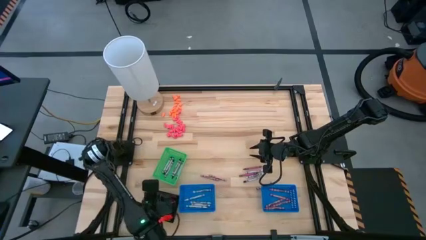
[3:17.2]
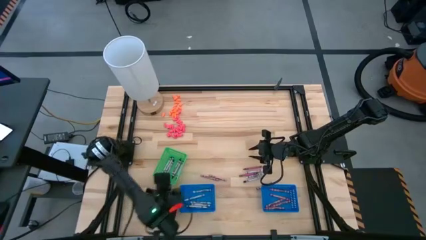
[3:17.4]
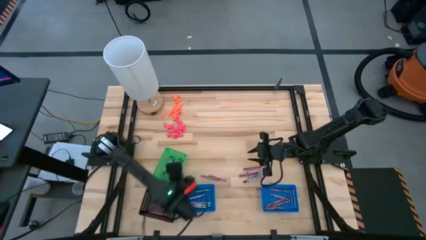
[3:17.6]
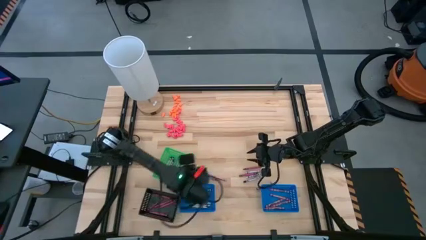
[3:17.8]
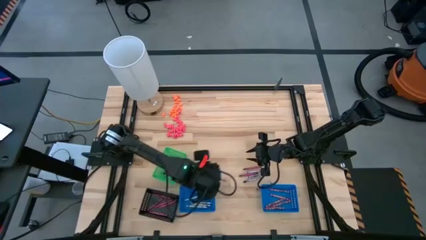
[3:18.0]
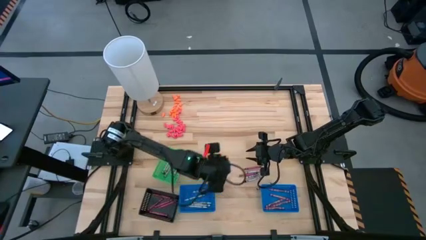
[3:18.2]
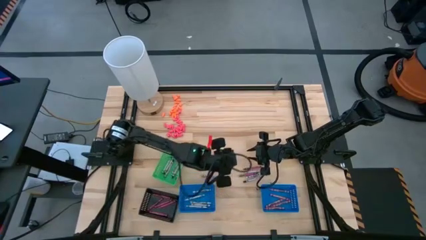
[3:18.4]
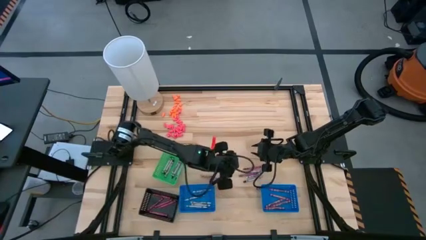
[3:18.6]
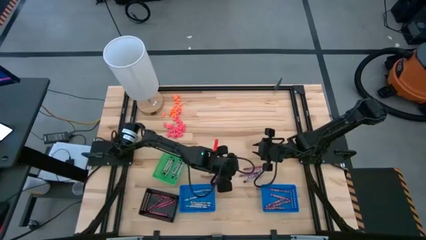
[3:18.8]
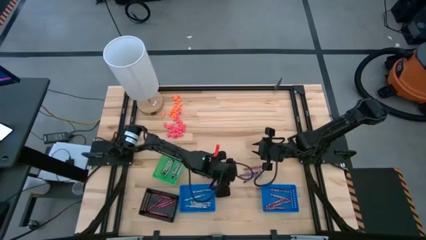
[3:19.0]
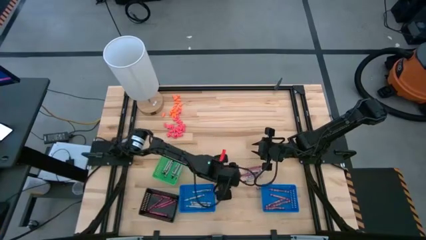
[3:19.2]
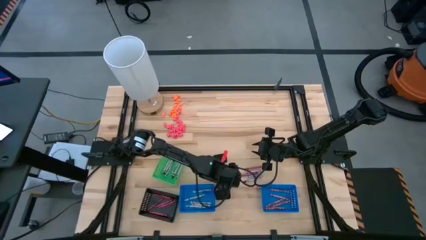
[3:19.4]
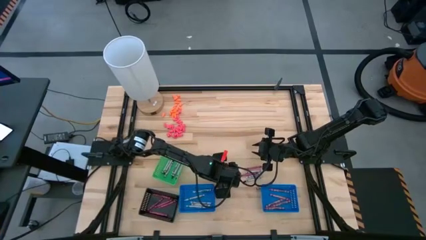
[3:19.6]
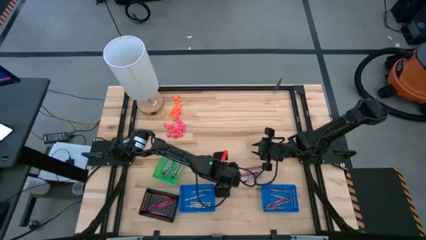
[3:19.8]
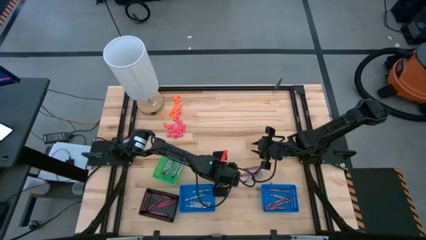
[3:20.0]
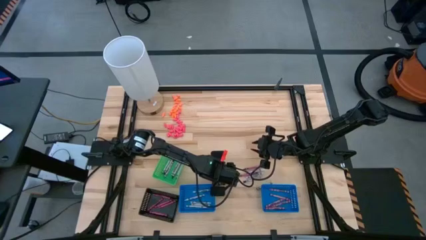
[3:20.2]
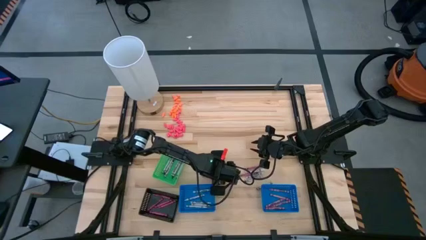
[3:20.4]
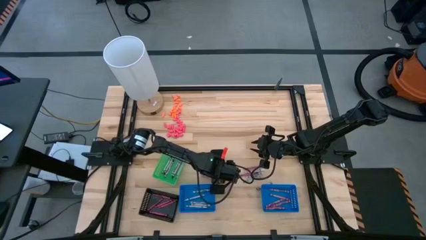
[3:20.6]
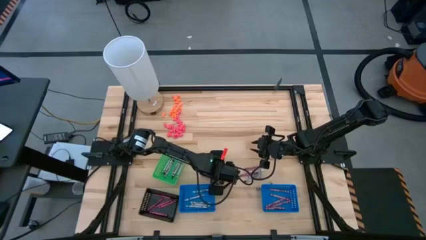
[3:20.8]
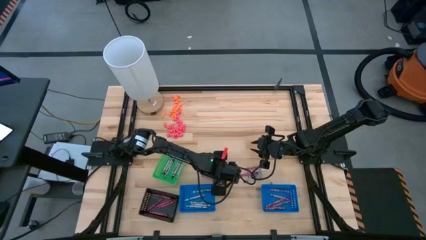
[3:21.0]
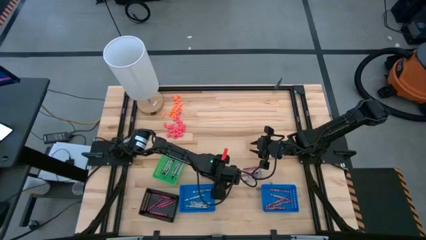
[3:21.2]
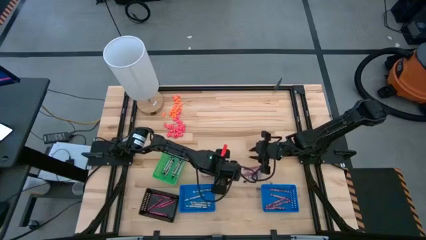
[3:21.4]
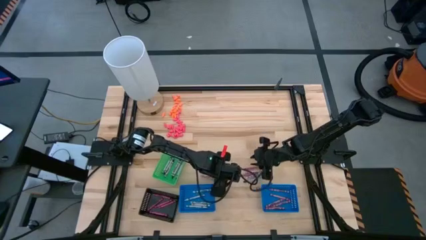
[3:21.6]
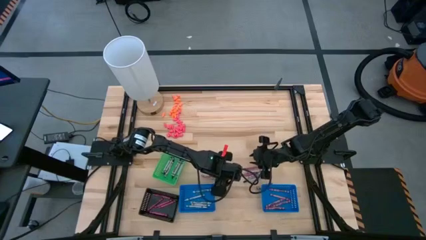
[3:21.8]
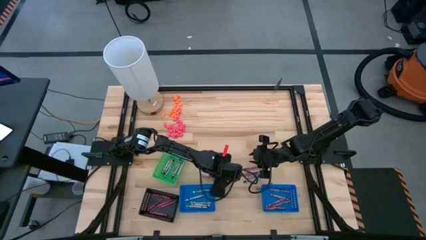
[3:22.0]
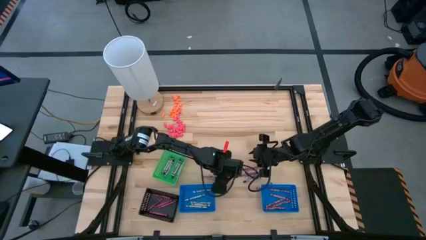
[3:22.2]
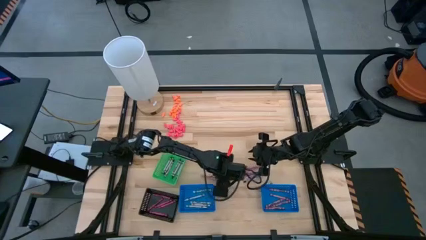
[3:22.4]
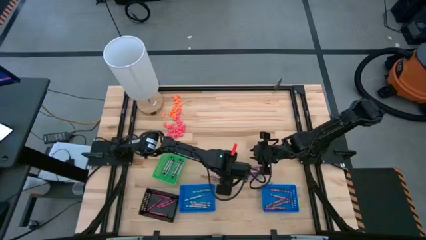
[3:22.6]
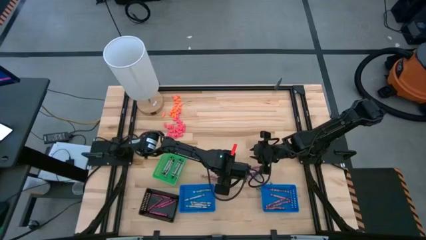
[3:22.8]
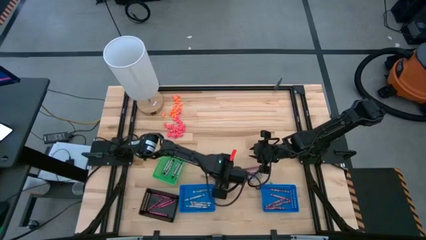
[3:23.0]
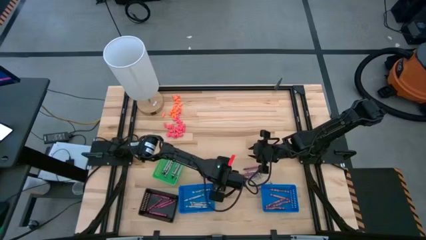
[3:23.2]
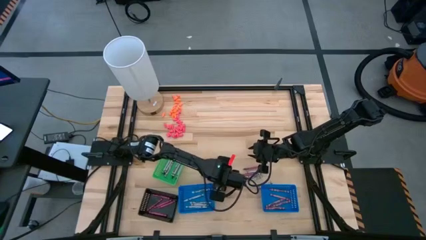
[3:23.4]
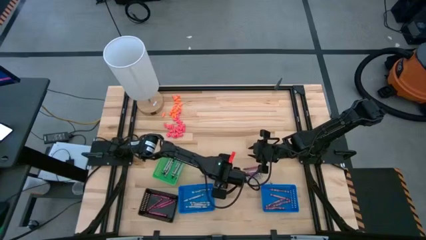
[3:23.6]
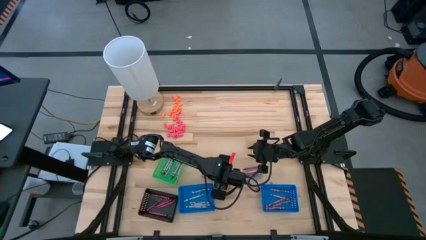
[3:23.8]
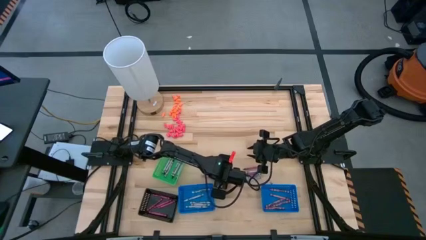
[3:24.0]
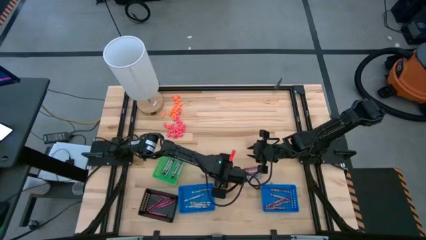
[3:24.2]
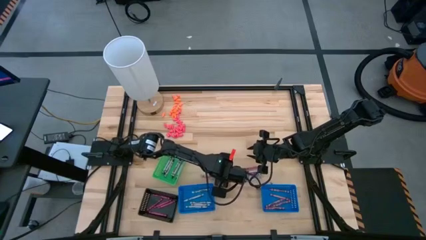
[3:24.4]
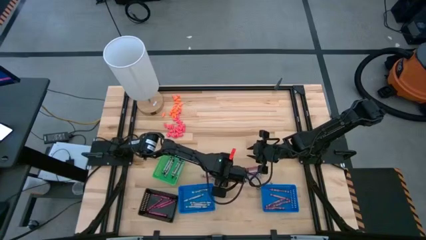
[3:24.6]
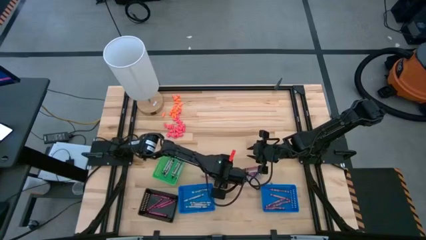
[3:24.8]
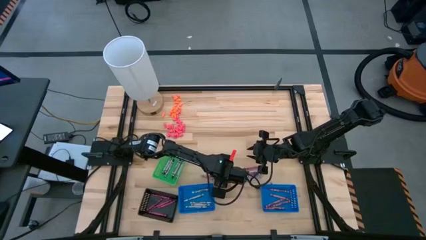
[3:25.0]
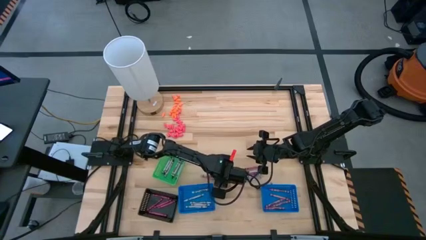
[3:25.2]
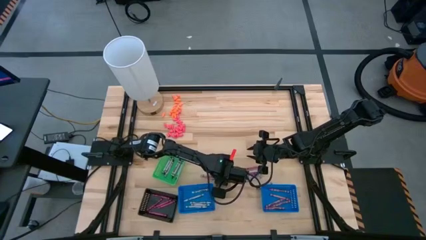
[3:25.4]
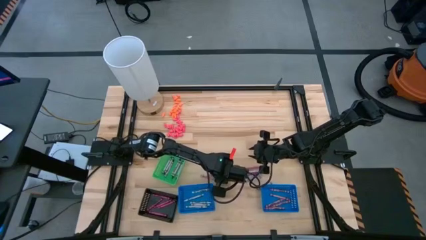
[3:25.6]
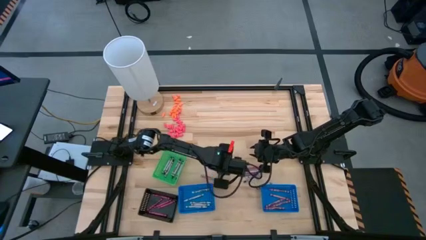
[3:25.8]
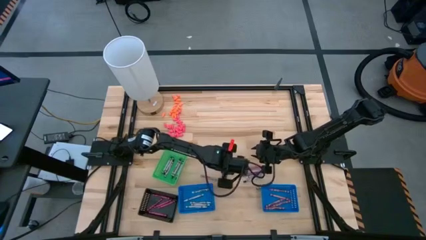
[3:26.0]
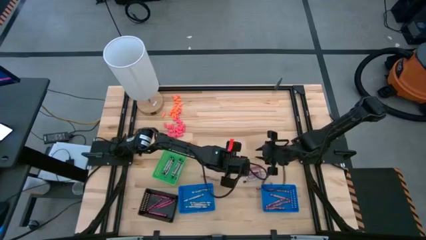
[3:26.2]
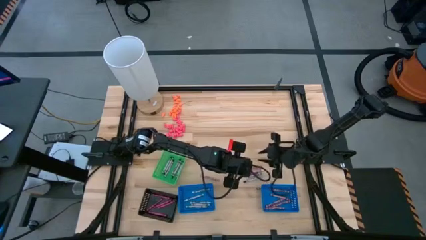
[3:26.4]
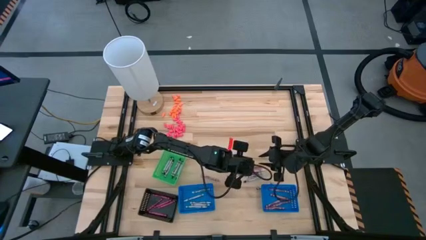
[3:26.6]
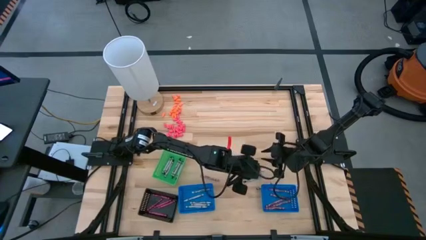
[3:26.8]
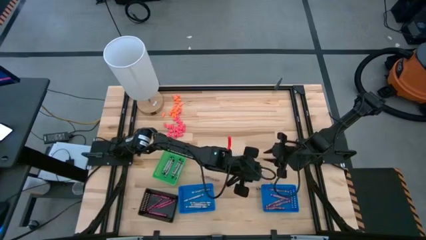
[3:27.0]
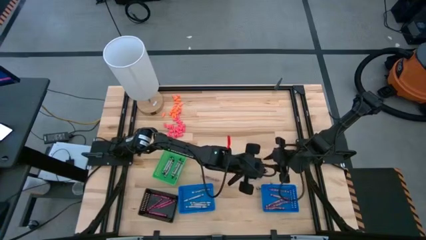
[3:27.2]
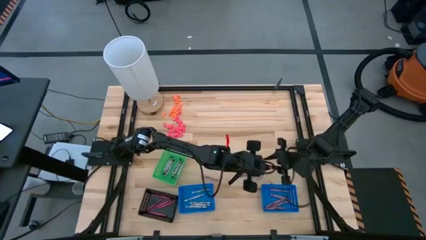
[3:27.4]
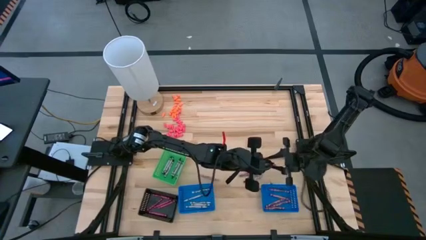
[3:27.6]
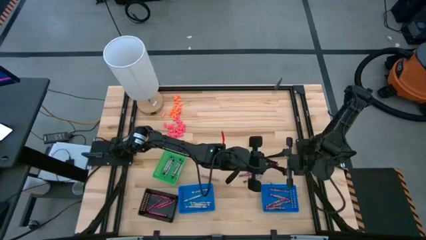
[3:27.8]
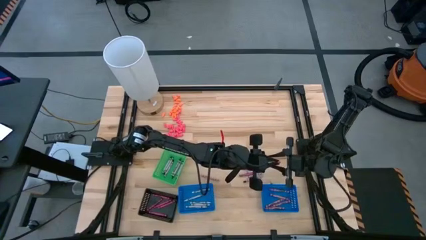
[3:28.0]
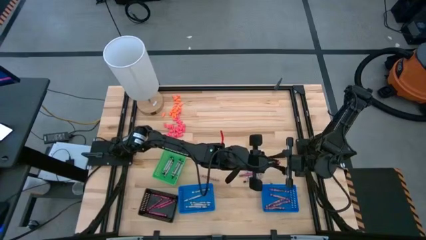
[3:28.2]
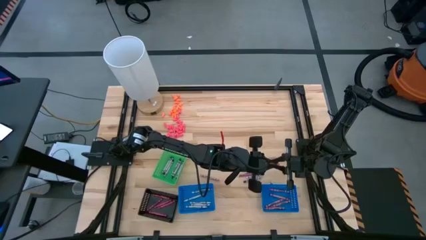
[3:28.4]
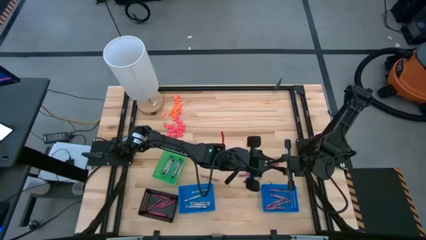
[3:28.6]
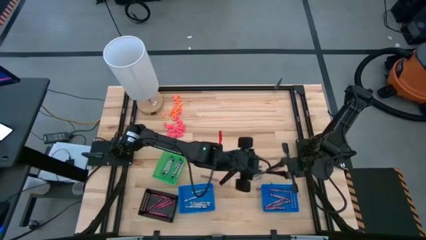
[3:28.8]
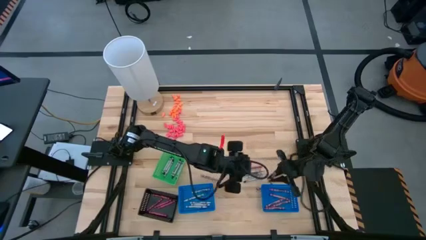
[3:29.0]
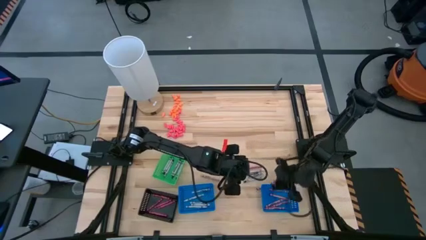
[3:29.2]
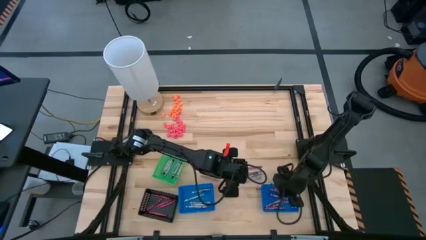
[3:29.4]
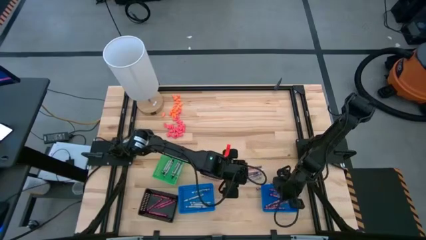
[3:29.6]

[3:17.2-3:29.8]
Task: Sort crayons
Put the pink crayon into the right blue basket
